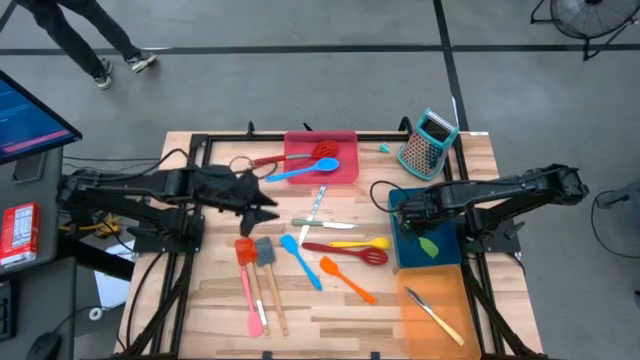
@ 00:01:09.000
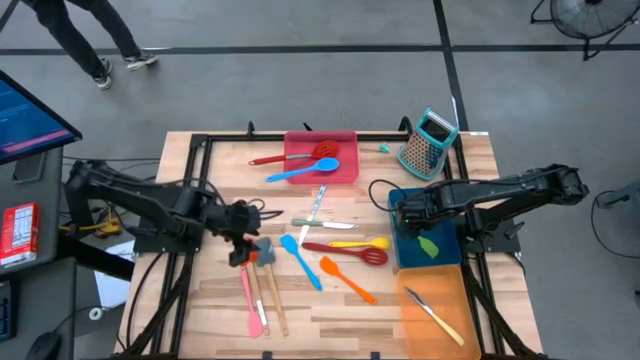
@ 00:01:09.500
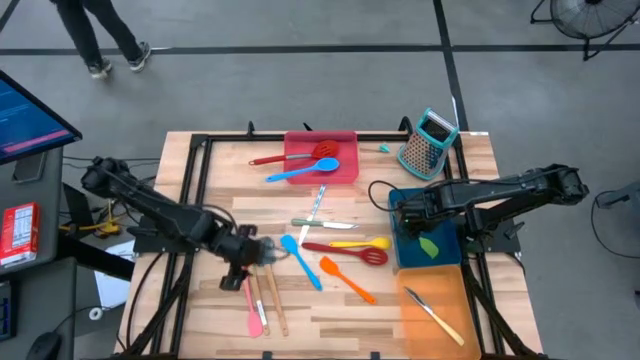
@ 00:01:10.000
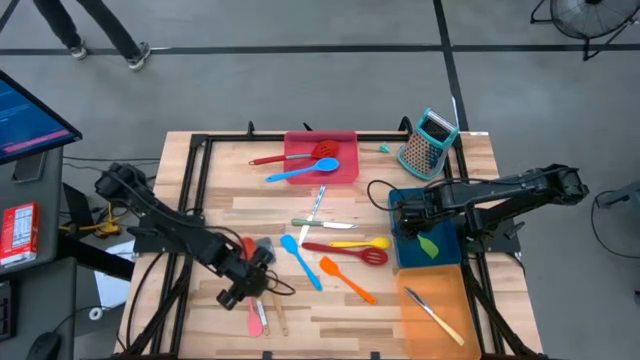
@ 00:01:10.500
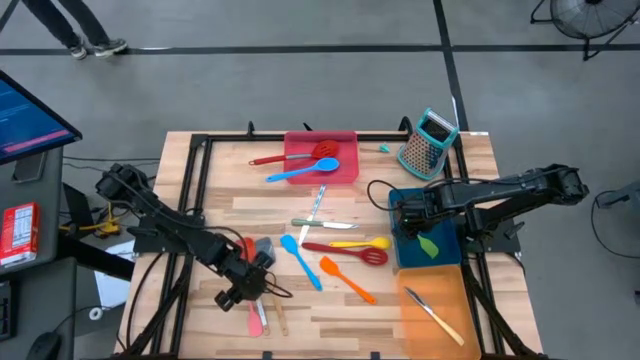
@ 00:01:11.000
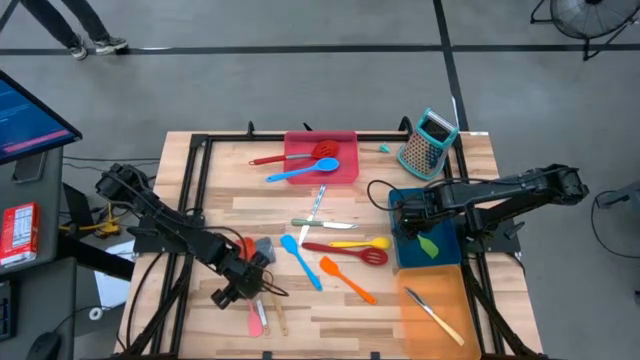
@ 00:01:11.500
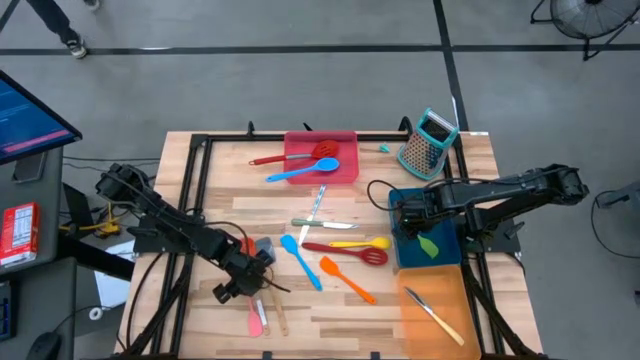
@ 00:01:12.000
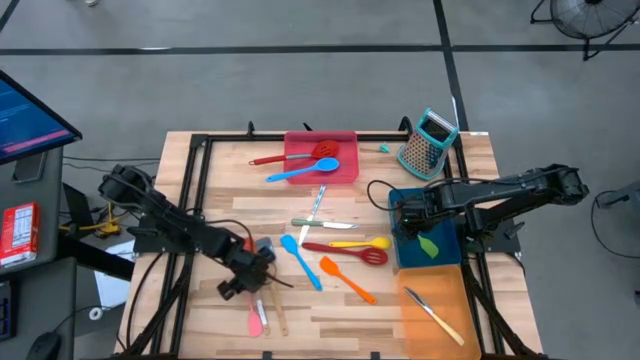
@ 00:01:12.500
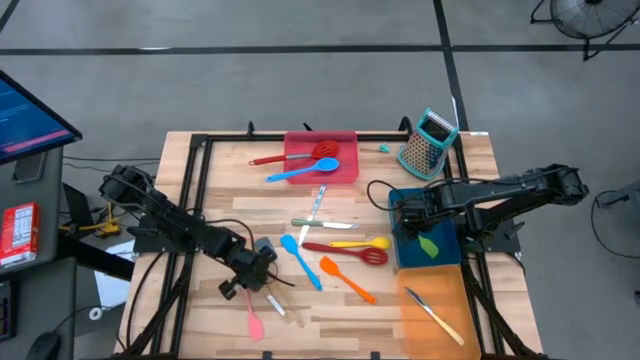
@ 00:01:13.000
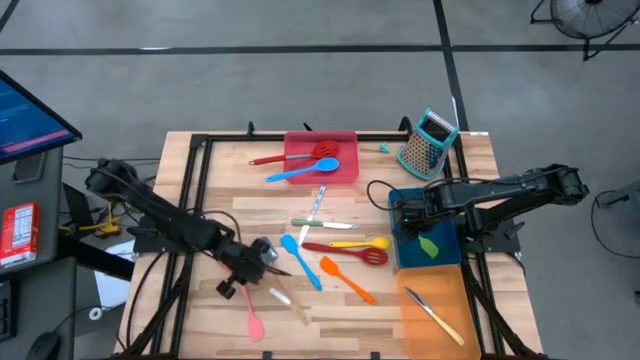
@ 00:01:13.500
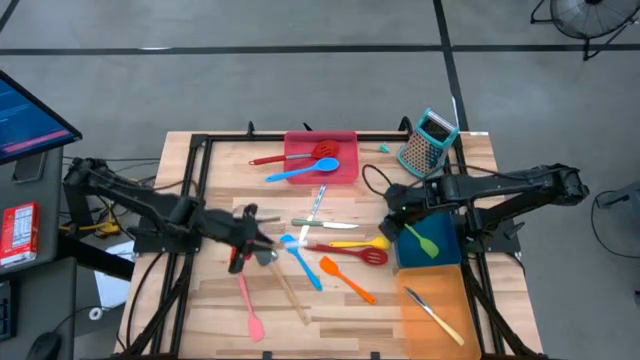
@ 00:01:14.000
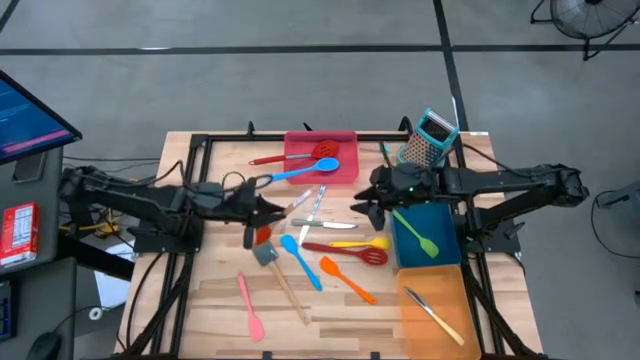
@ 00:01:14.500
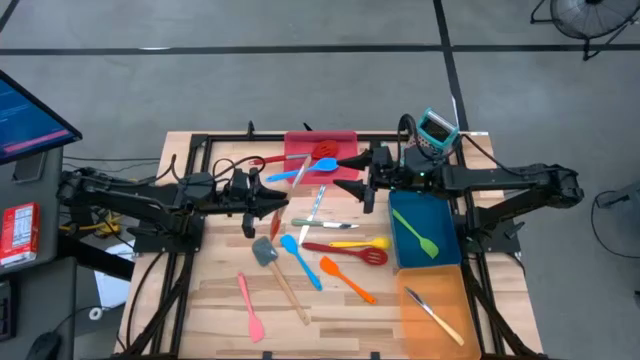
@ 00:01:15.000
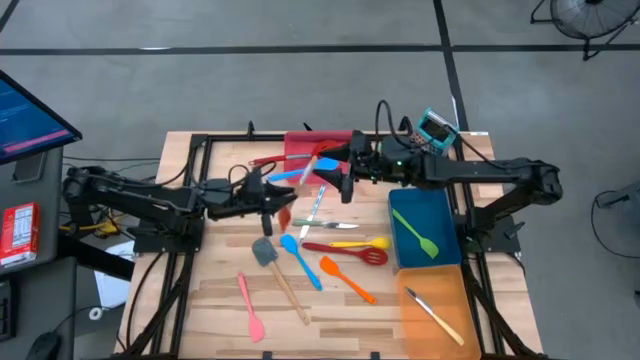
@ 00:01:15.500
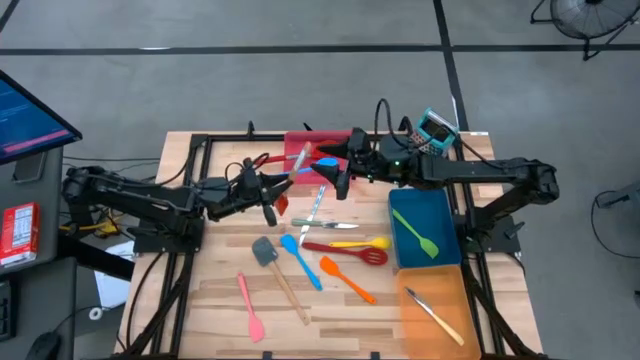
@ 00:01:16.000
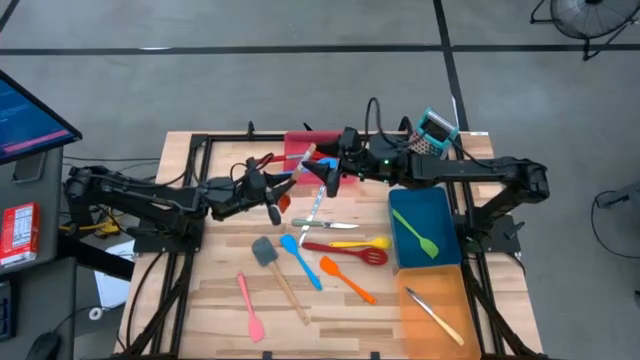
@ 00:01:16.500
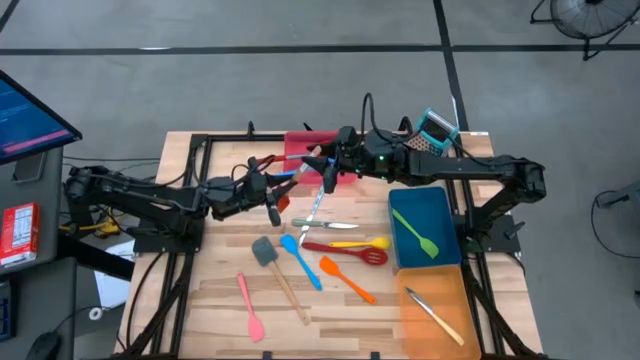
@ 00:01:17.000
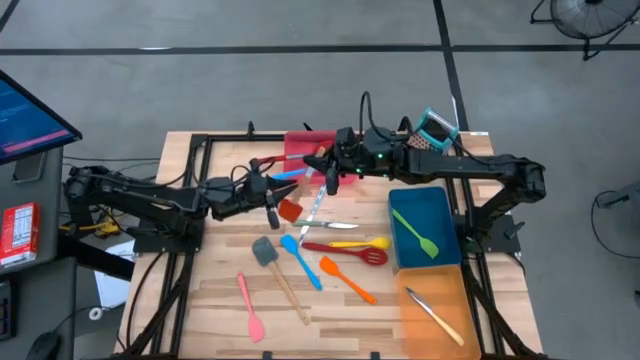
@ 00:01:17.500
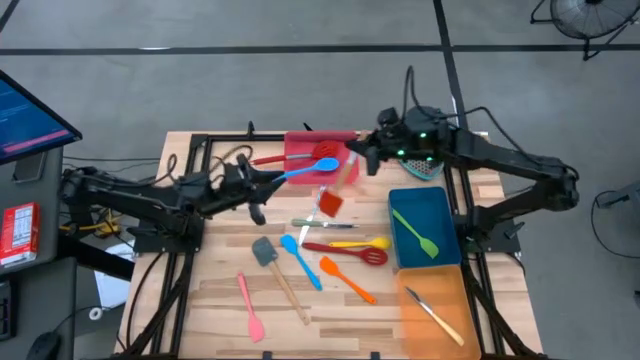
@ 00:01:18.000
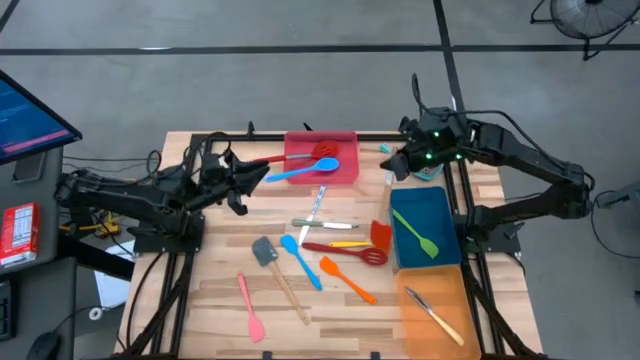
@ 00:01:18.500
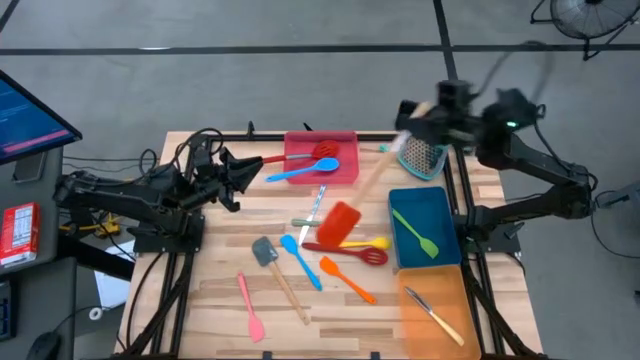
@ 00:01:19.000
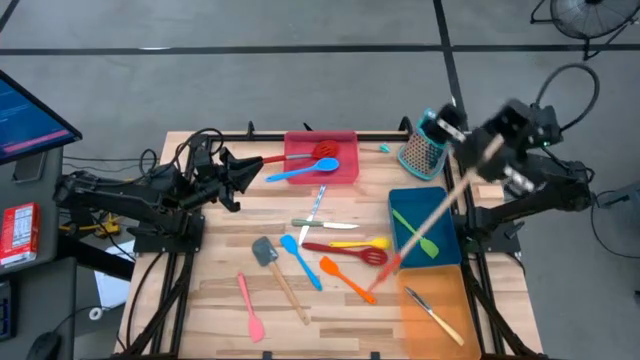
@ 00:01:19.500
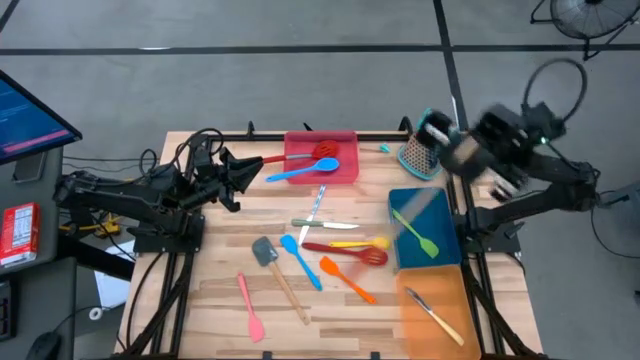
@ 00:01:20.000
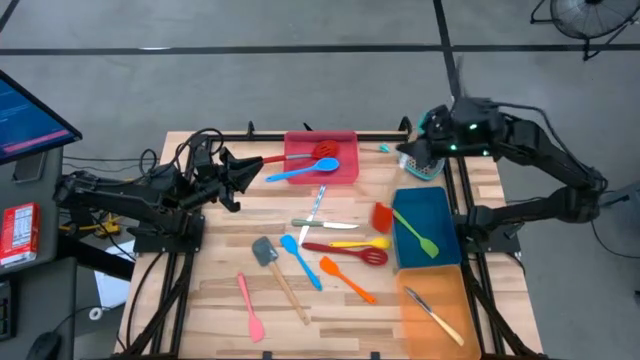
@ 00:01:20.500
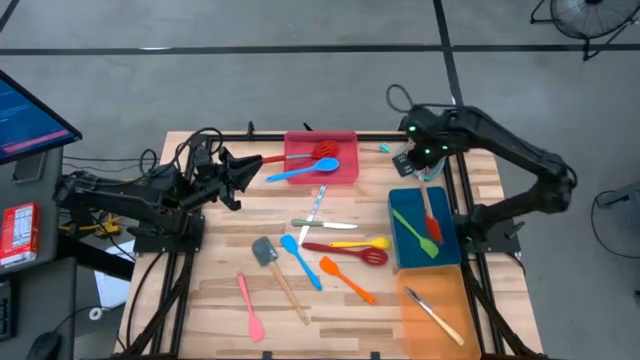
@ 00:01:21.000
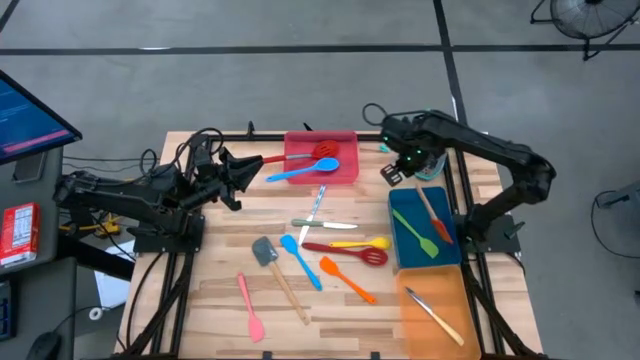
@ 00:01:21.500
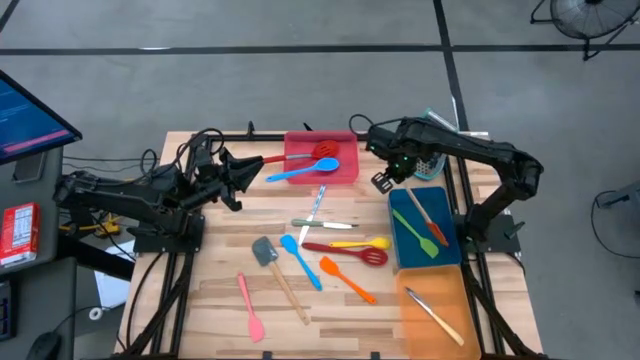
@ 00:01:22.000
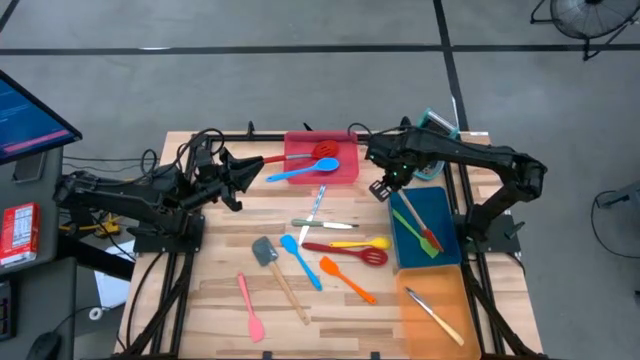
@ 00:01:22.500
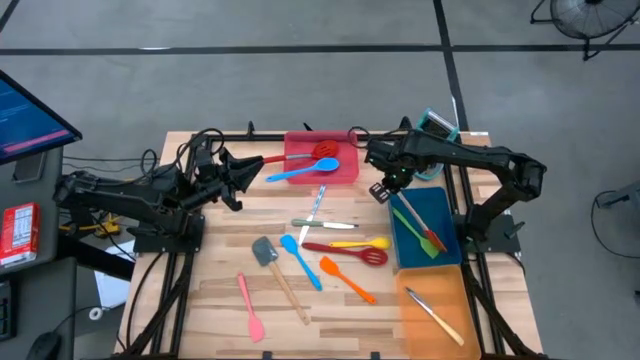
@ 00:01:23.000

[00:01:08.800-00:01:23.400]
Task: Pick & Place Kitchen Items
Put the orange spatula into blue bin
